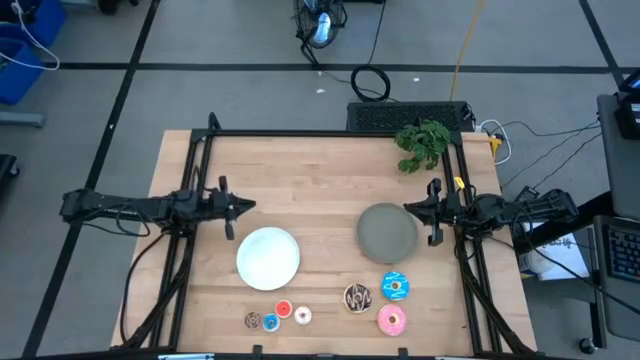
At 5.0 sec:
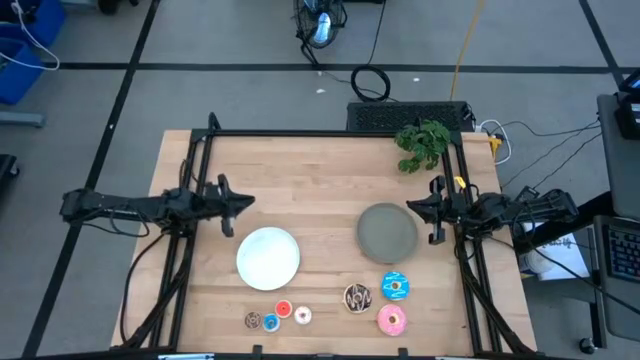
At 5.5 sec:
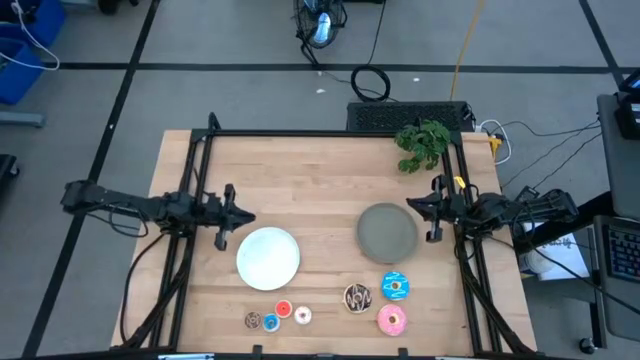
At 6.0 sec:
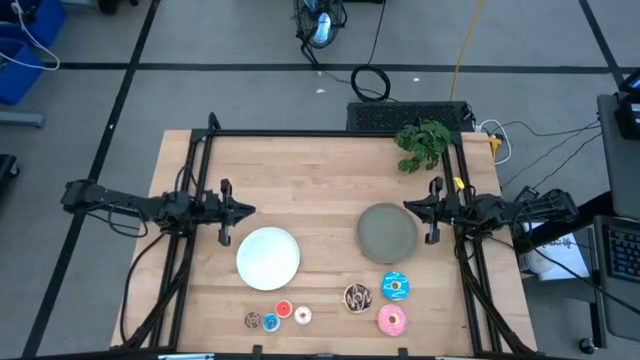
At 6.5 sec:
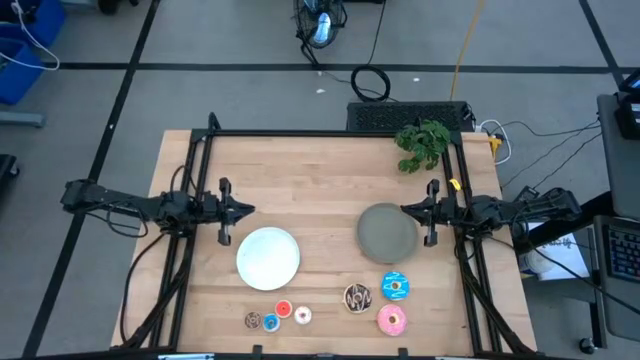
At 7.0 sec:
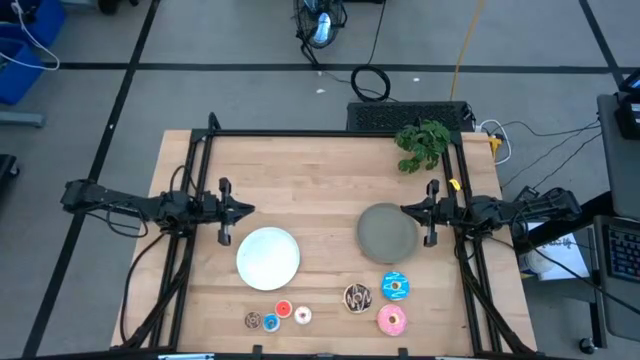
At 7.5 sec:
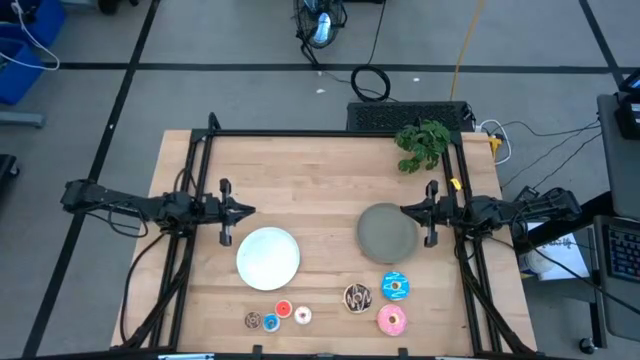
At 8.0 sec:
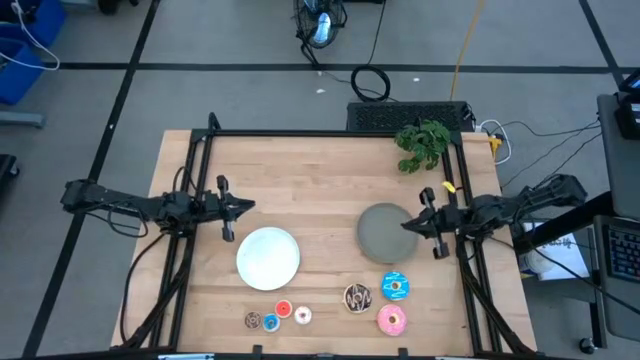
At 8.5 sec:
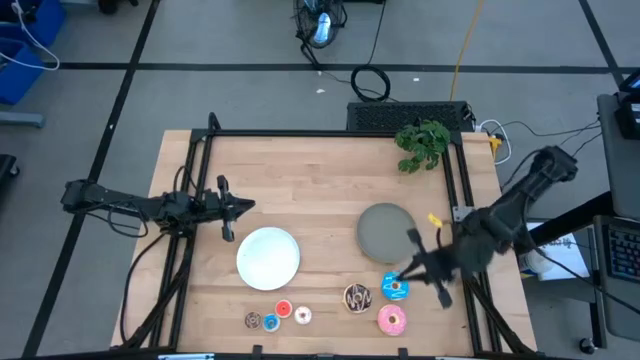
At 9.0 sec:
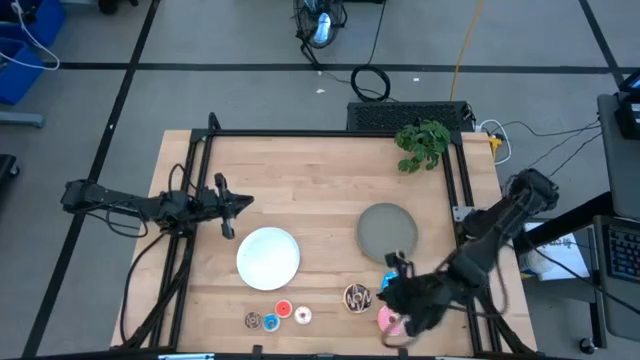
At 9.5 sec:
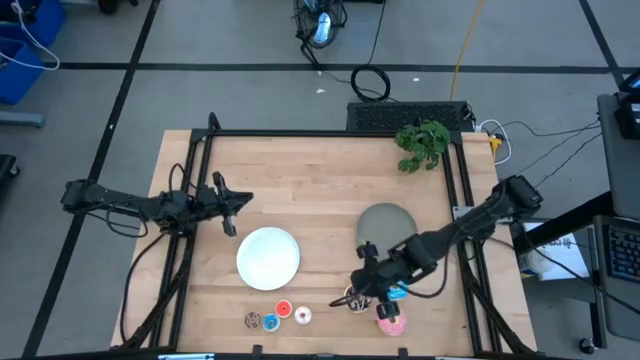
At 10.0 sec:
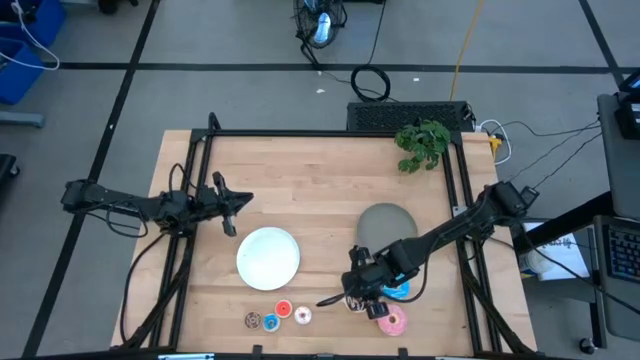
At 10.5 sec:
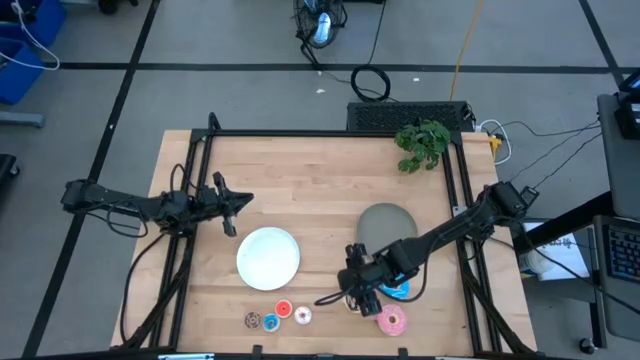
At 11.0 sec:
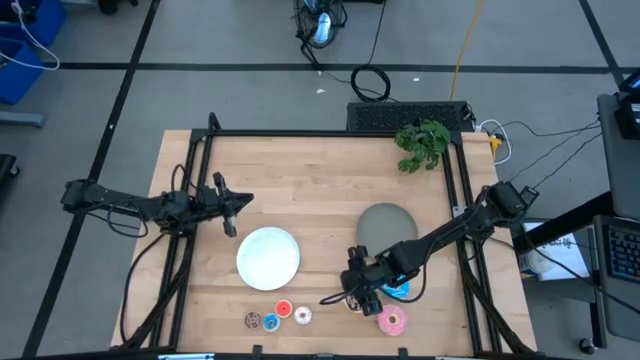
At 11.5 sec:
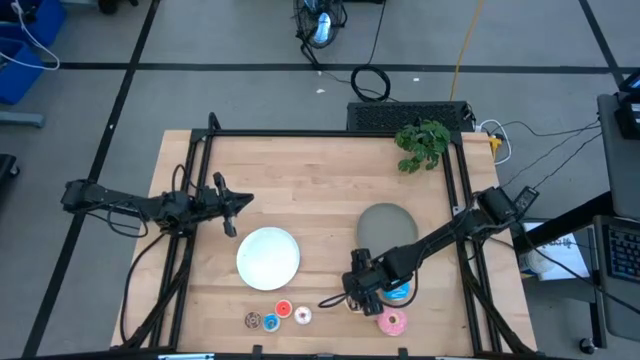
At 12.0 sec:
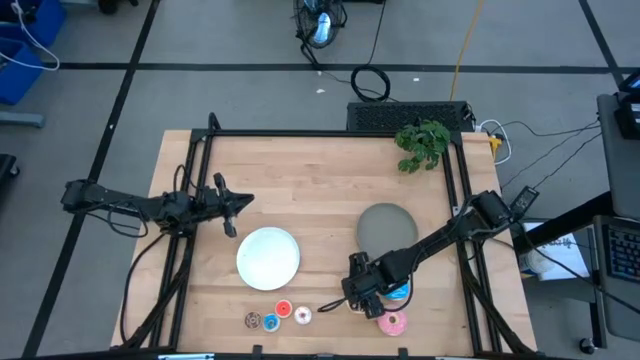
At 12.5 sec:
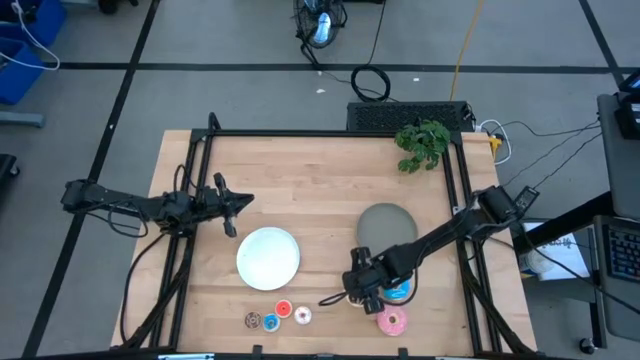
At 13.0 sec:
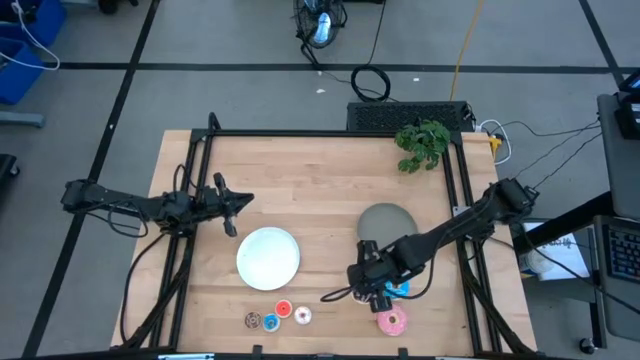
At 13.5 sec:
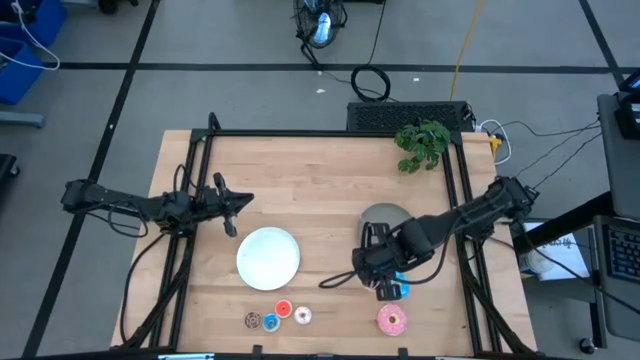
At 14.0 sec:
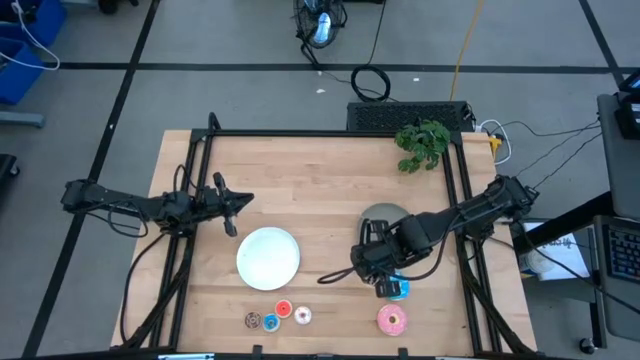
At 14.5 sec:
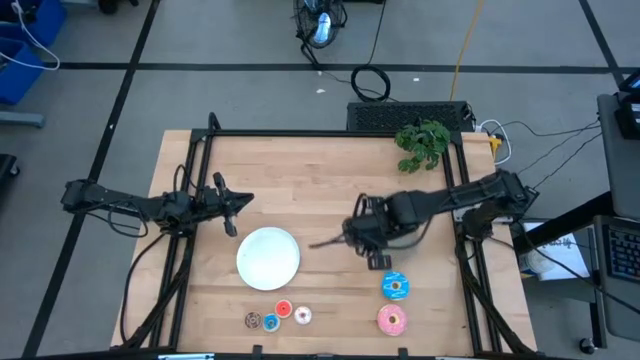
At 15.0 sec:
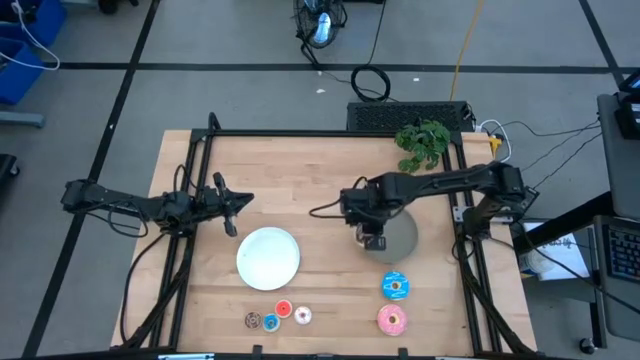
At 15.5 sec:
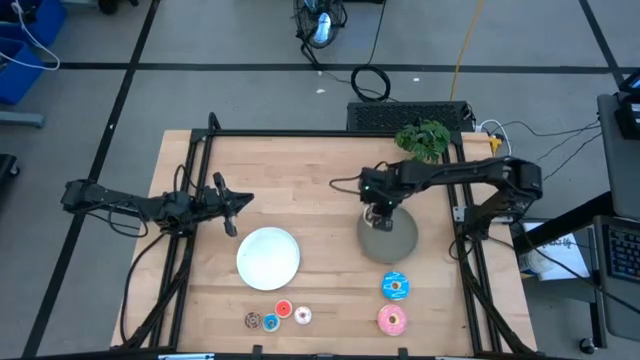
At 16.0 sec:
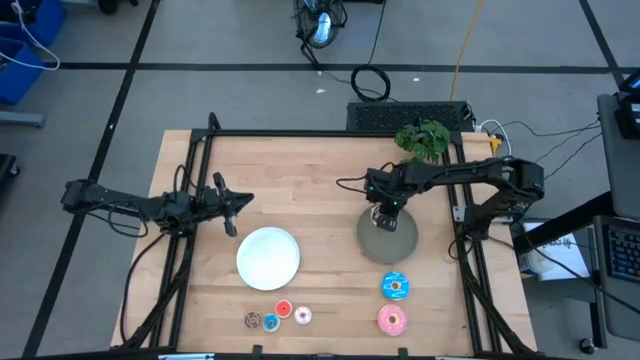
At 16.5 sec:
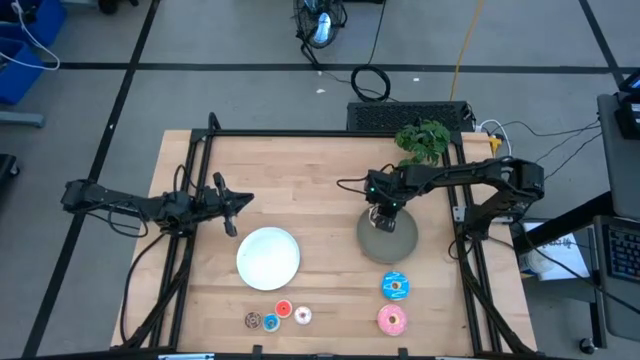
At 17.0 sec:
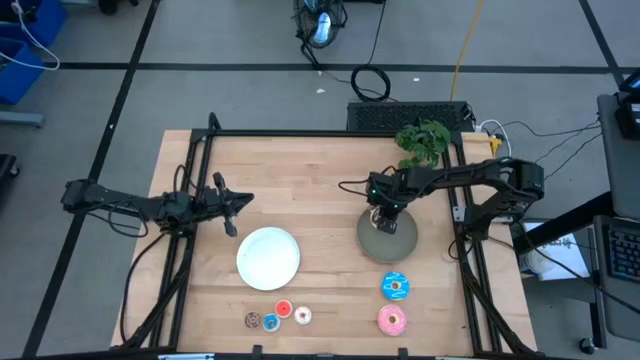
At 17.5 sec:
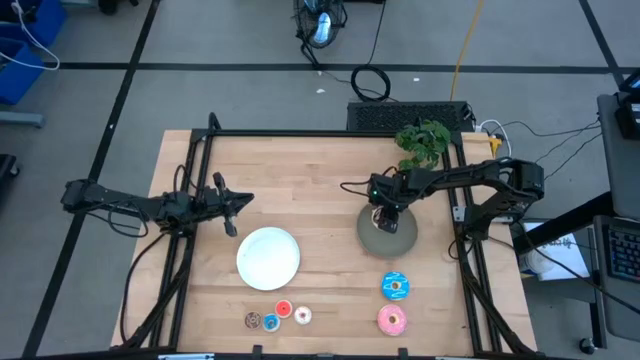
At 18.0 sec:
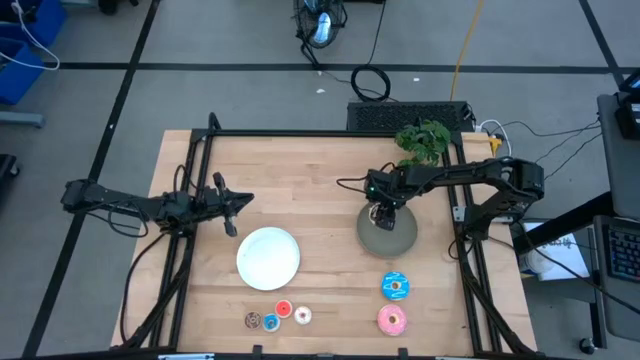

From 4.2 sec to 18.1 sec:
Task: Pick & Place donuts
Put the large black donut on the gray plate

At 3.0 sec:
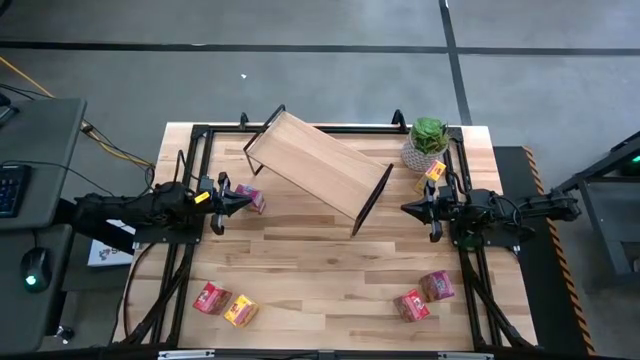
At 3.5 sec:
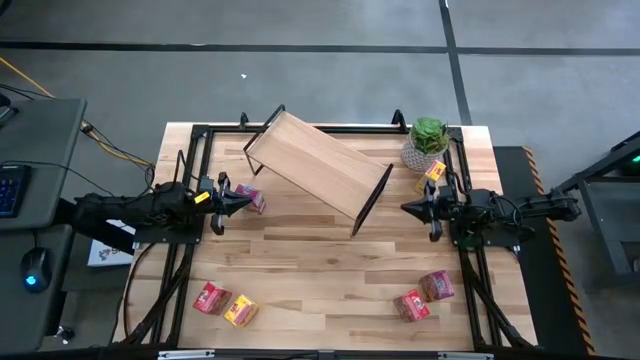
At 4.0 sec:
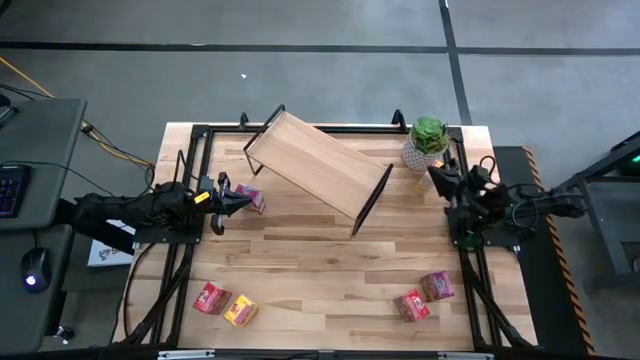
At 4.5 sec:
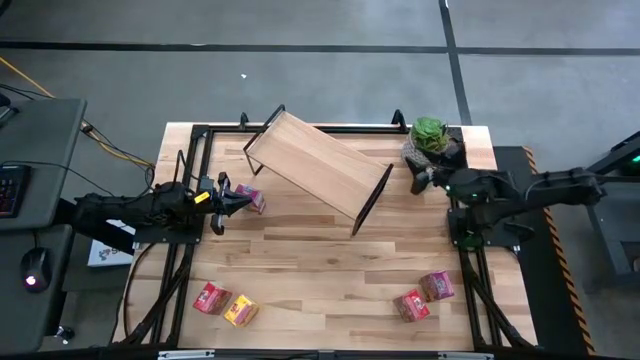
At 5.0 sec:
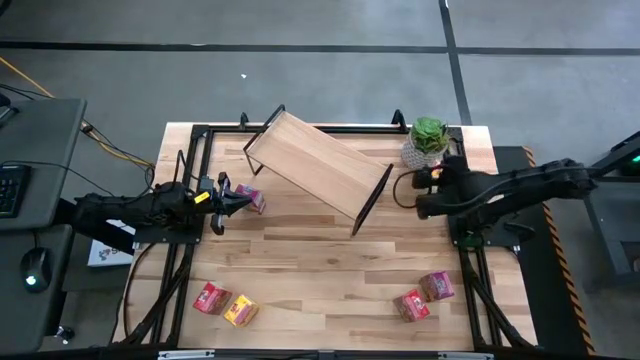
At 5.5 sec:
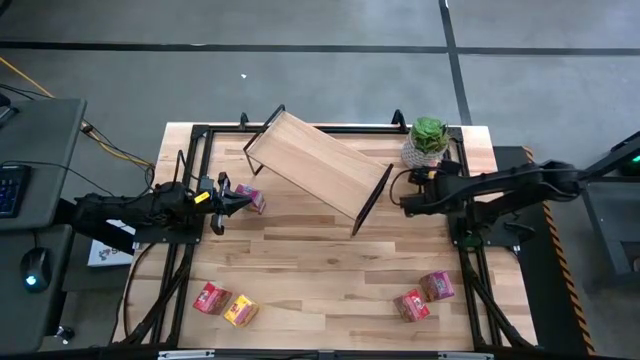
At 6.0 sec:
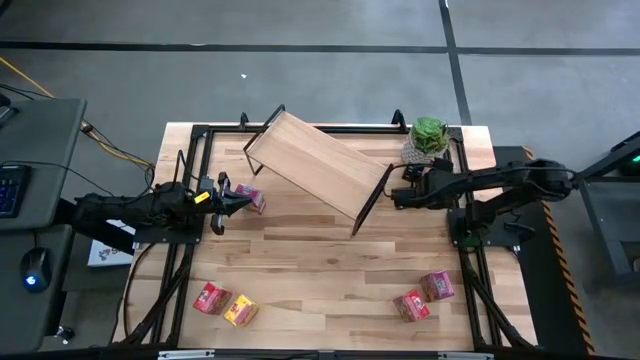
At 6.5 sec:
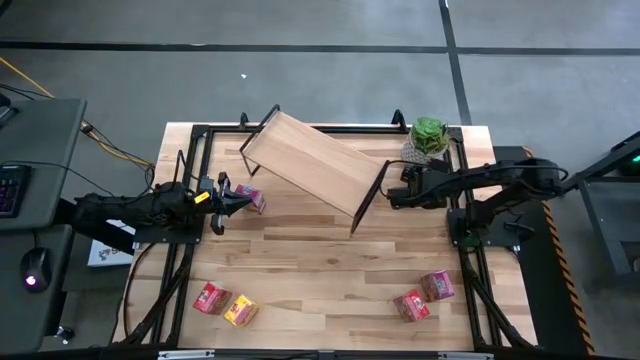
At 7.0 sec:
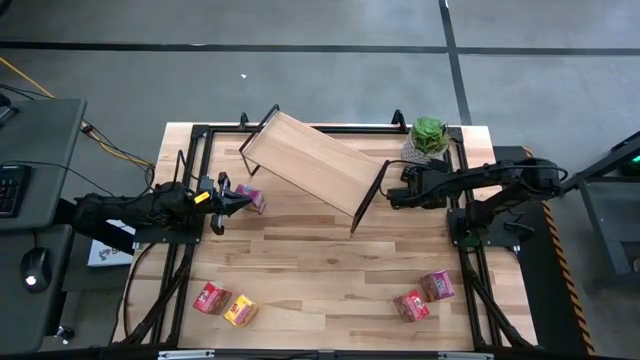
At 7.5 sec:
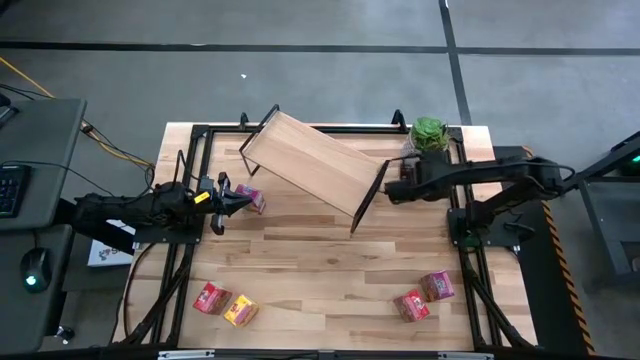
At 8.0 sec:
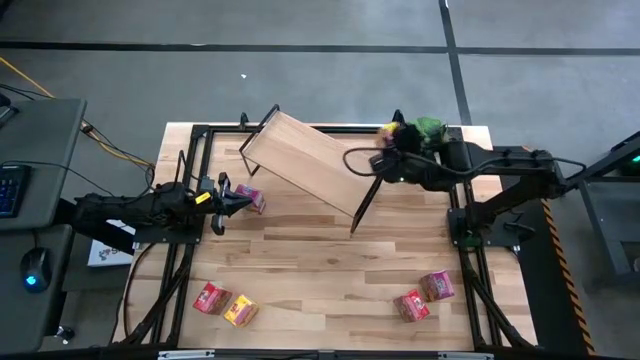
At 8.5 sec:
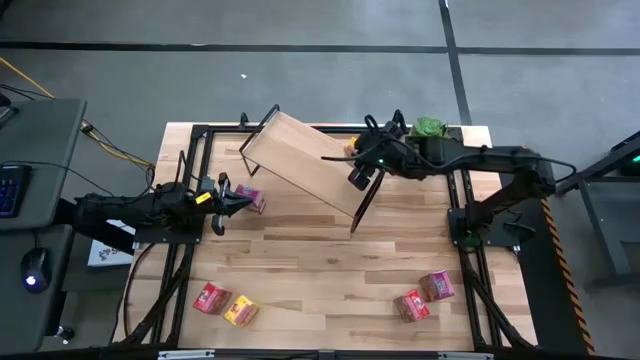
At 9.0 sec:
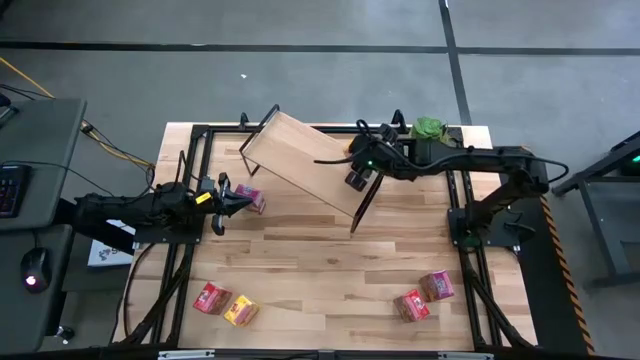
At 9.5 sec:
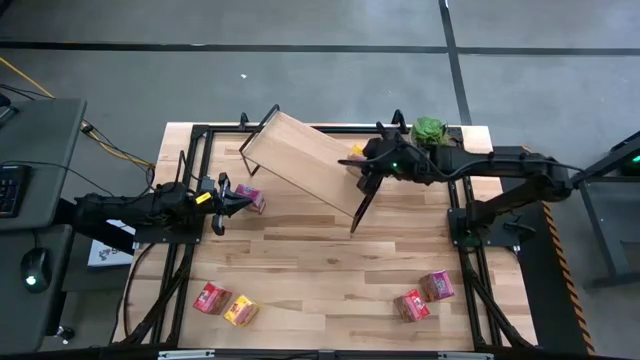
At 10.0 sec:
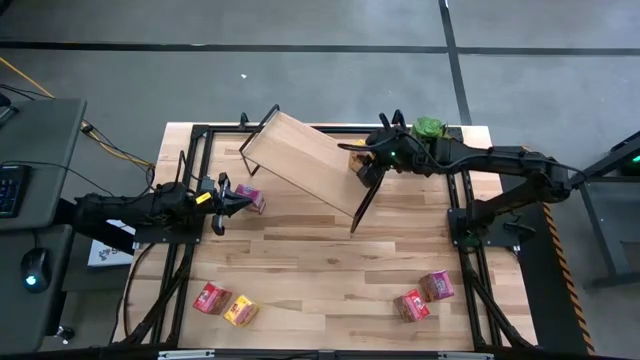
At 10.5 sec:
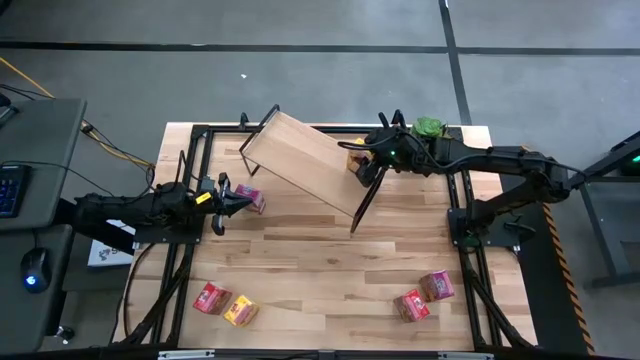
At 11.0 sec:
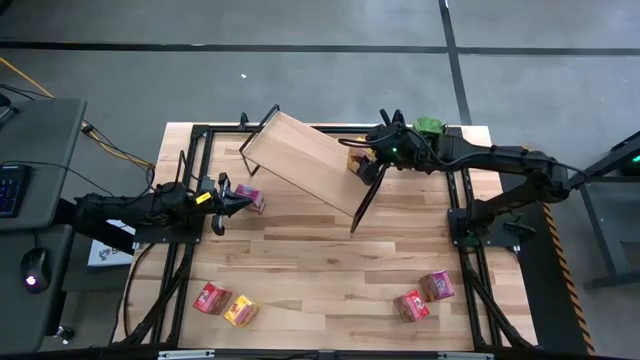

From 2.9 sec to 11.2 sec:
Task: Stack cereal on shelf
Put the top right yellow cereal box on the shelf
